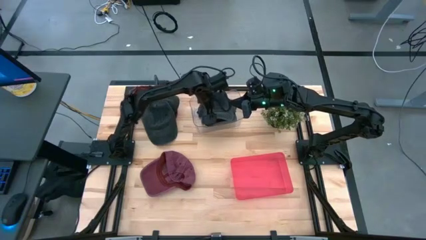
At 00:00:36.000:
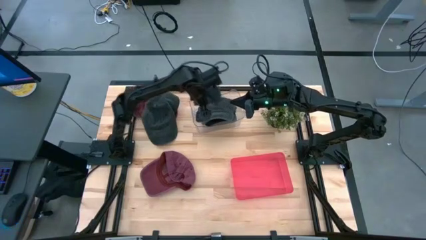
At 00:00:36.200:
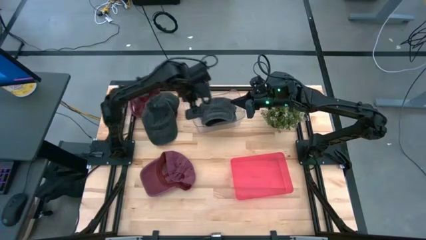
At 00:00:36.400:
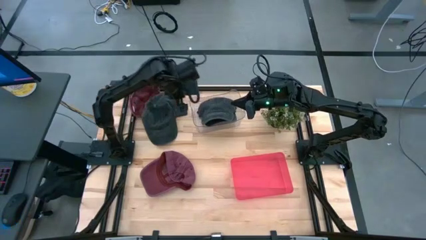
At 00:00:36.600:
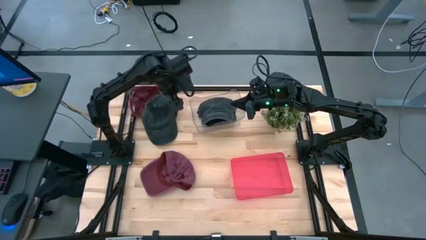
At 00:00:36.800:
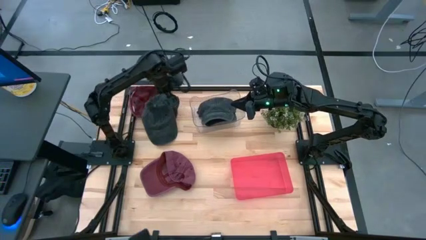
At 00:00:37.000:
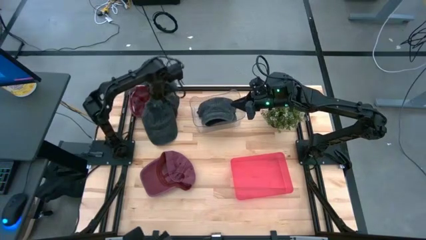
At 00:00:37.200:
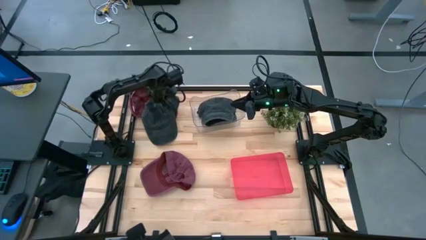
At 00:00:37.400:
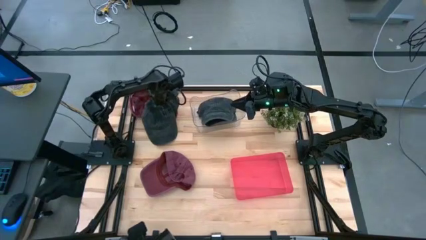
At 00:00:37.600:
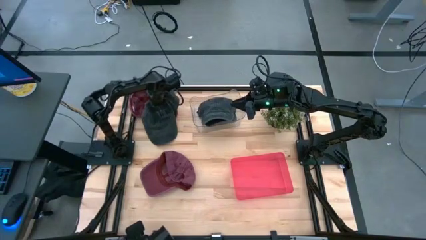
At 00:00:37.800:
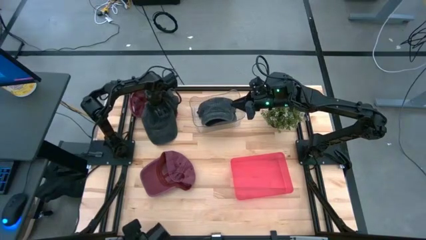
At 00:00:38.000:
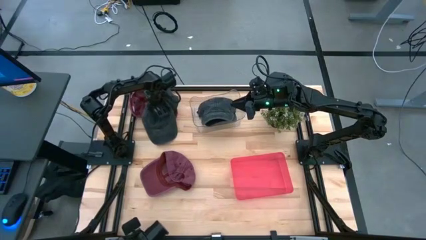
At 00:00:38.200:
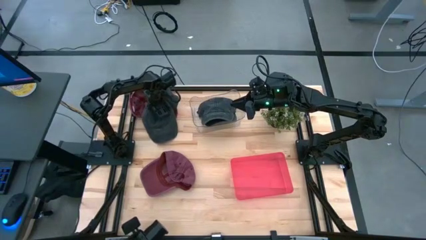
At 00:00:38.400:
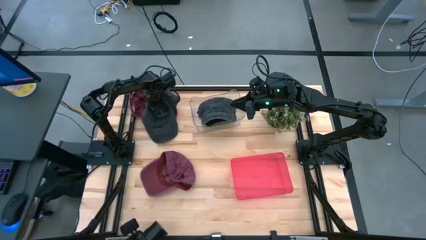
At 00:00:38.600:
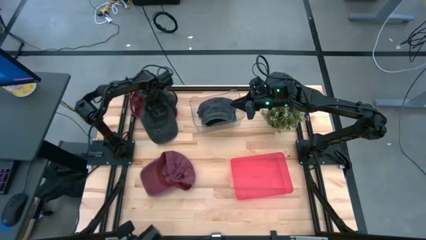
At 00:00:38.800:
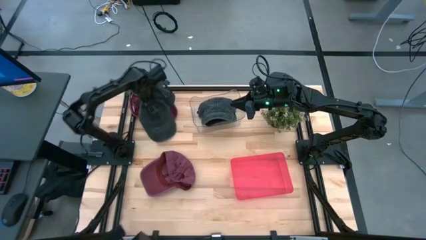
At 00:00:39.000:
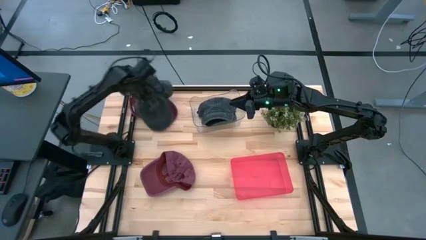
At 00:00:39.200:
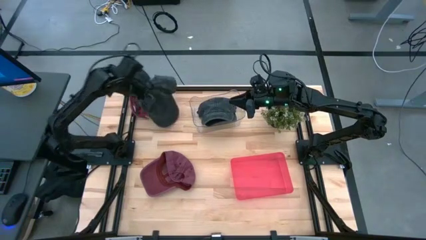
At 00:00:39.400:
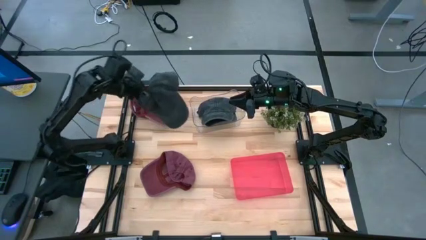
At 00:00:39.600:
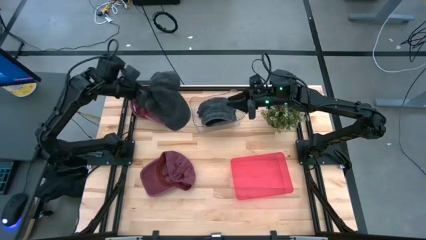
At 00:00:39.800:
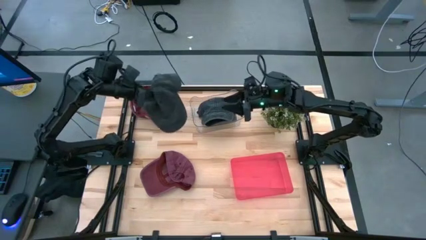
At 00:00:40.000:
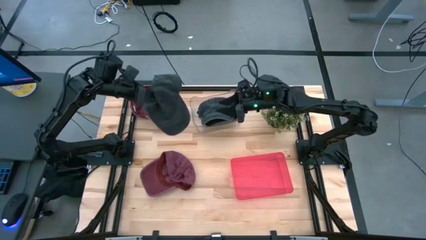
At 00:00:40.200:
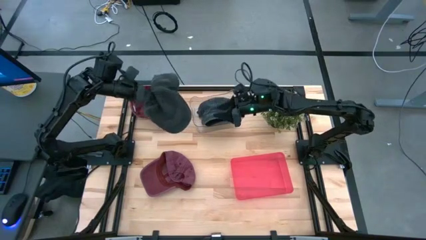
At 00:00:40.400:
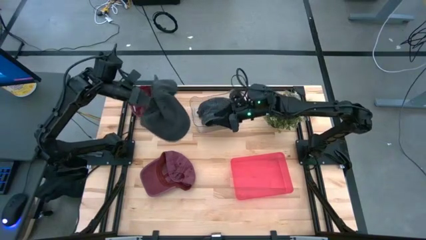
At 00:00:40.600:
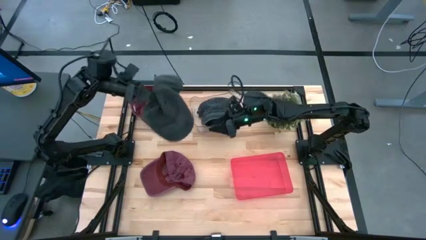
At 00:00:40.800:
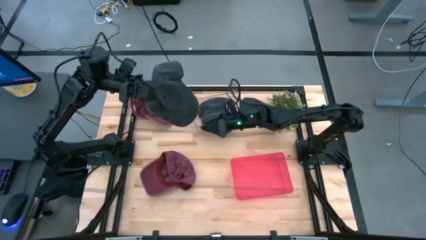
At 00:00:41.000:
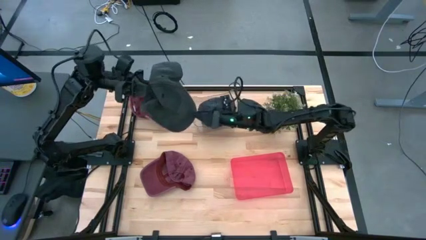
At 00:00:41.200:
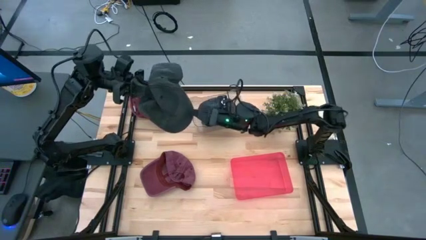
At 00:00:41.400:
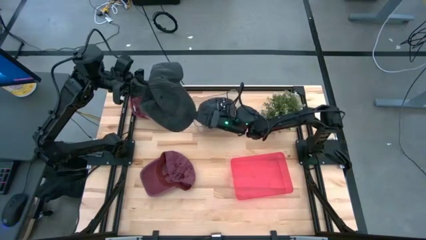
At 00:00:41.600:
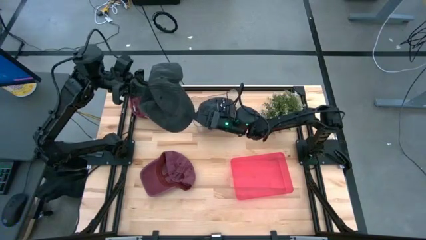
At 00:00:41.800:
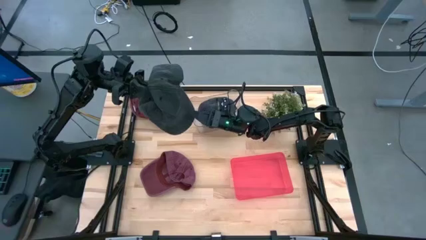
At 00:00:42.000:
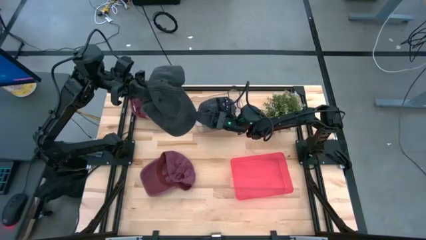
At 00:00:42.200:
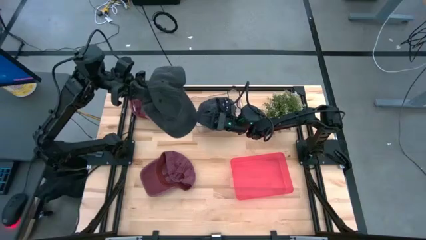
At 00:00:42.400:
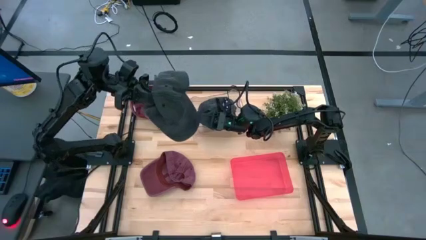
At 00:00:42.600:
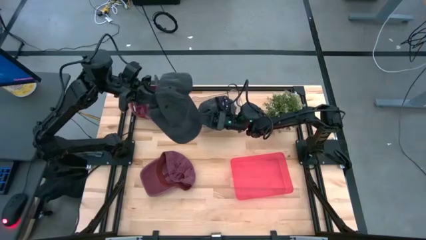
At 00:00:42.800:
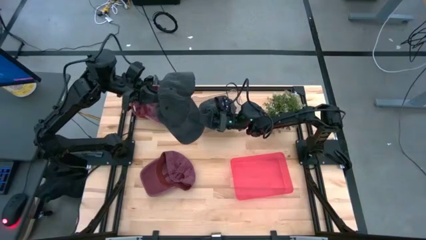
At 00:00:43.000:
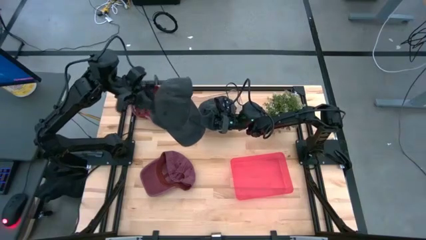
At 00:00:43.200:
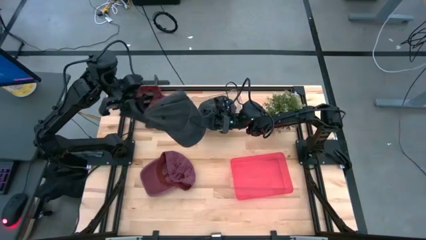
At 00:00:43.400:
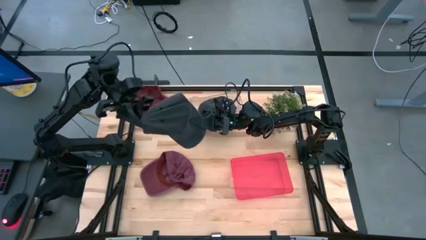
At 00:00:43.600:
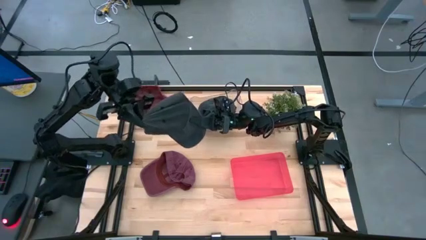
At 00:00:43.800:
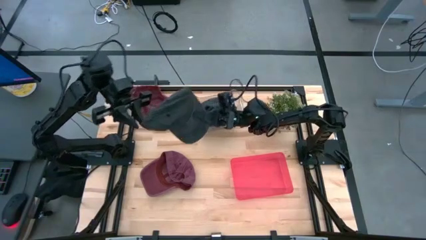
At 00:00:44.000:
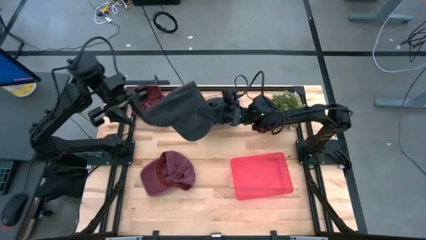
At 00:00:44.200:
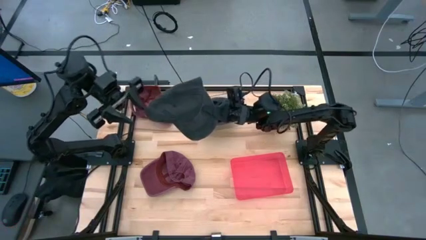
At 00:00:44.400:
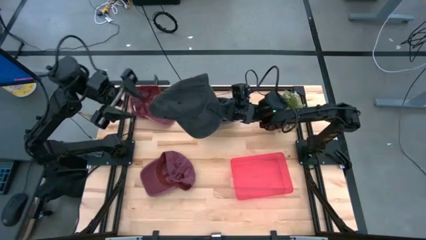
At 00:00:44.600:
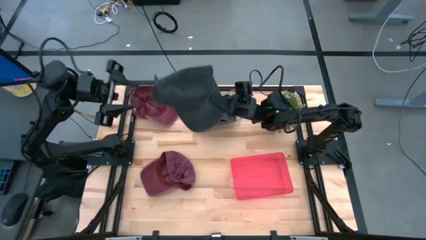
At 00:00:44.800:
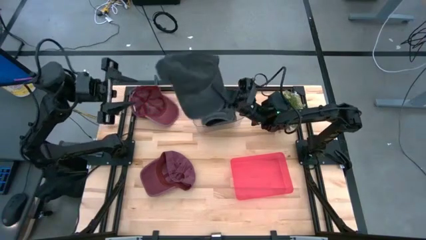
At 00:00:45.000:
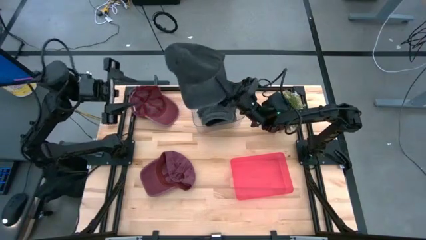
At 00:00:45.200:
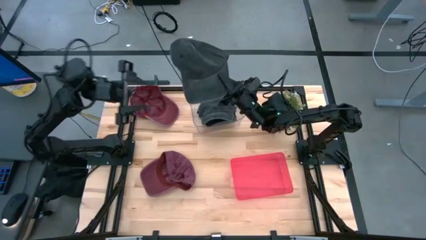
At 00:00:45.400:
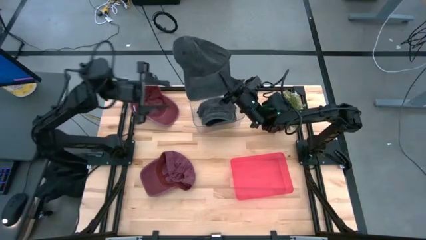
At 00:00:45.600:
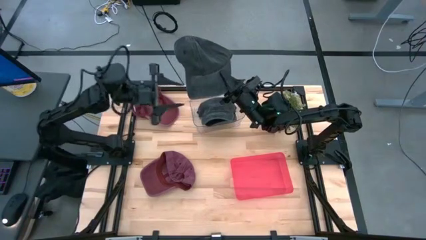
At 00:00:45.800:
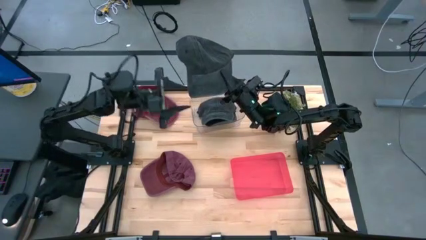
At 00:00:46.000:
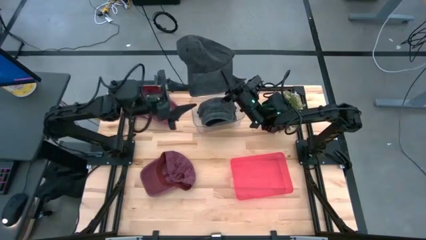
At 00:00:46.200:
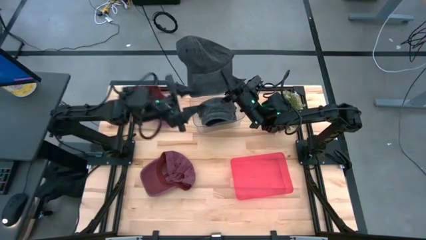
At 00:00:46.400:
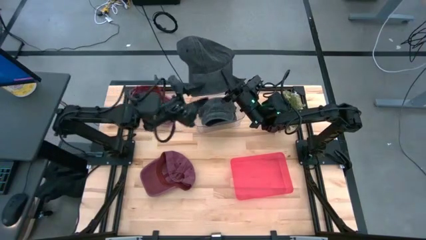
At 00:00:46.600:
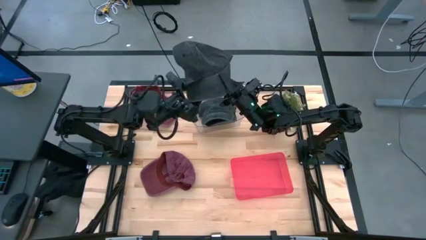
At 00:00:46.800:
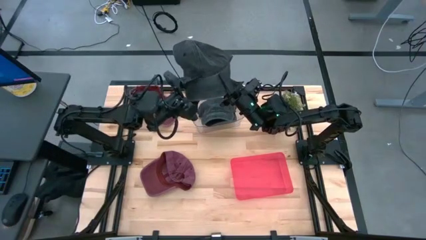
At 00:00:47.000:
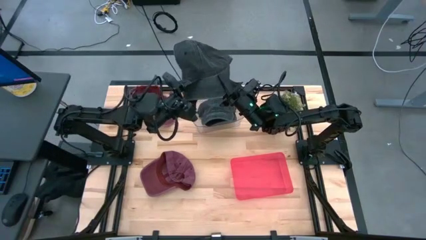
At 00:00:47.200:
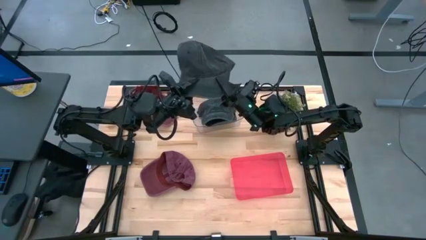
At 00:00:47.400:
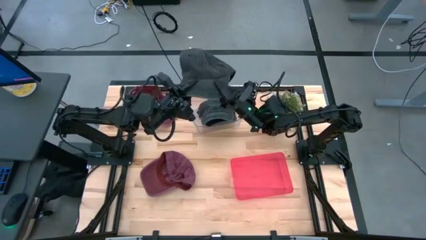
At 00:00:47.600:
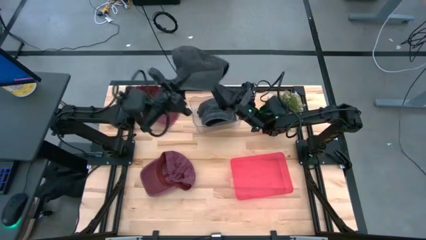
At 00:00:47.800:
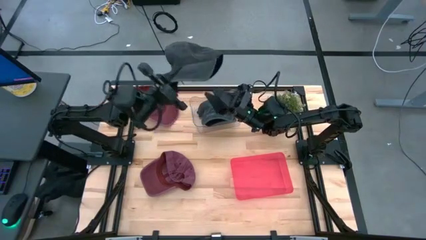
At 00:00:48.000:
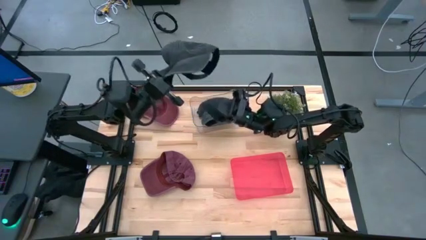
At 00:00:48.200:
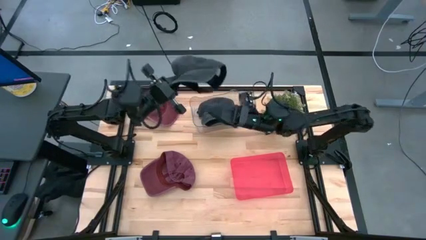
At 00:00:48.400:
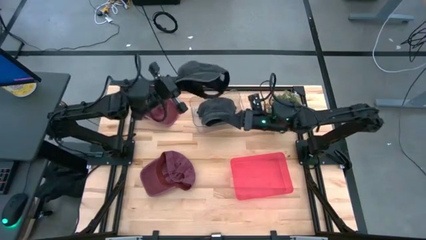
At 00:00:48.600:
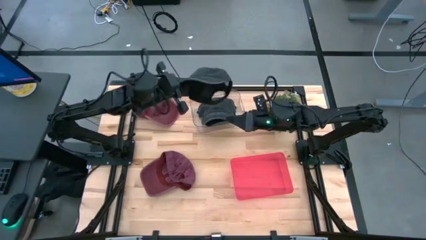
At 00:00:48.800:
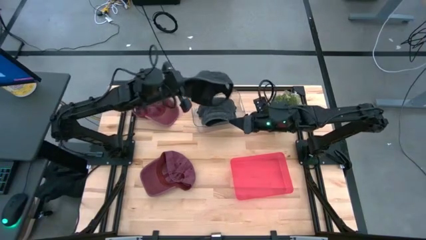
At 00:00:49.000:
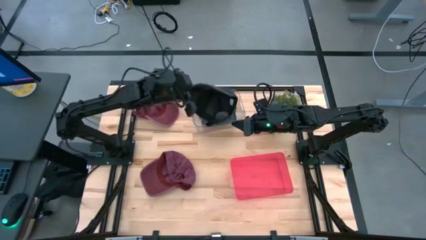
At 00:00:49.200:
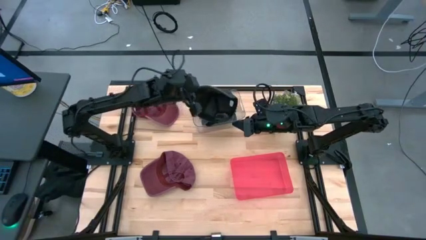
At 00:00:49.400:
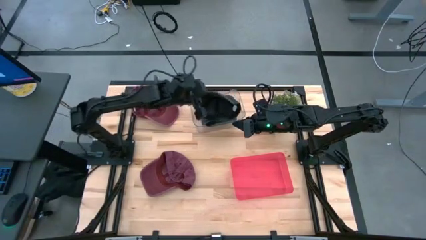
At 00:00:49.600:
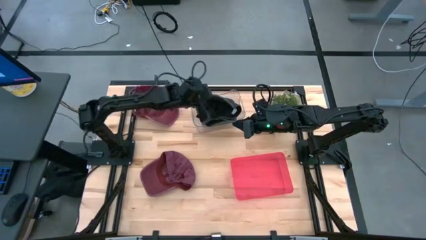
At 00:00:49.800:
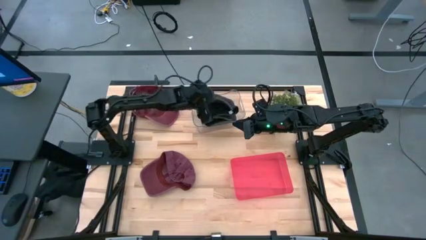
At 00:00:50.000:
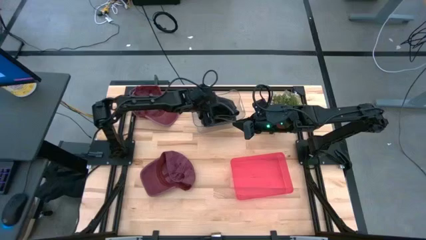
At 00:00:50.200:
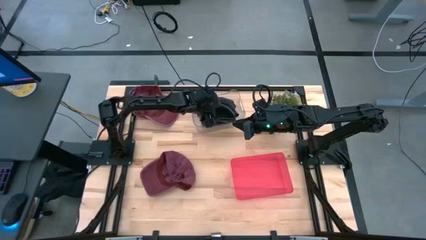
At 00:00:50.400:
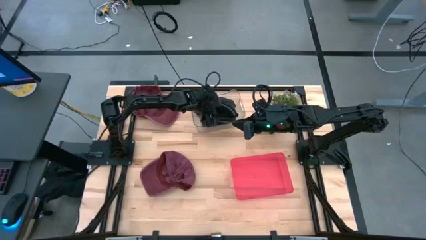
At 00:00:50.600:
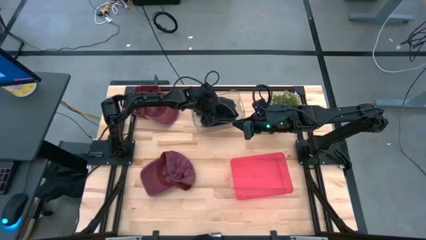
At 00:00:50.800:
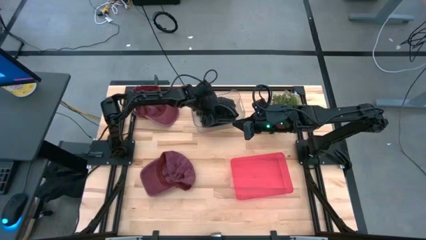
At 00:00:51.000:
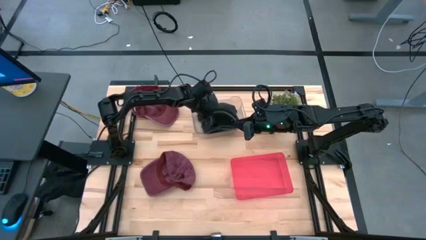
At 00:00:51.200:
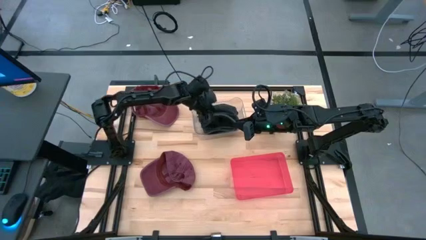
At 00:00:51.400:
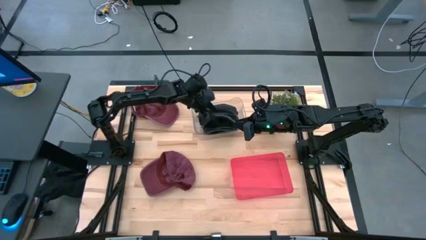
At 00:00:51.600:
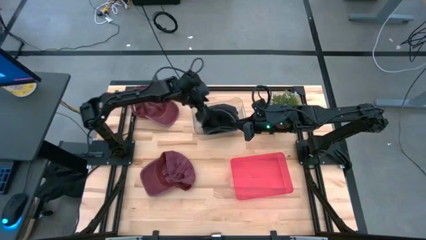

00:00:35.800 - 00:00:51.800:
Task: Pick & Place hat
Put the black cap into the transparent bin
